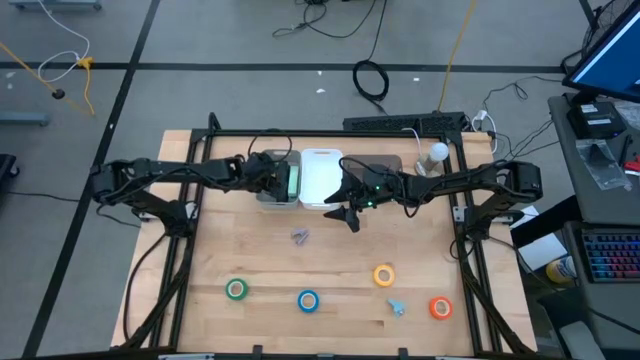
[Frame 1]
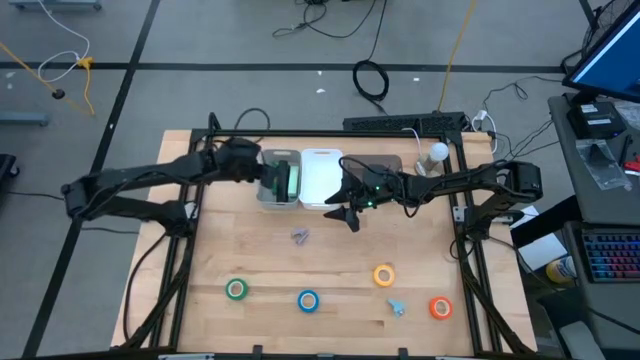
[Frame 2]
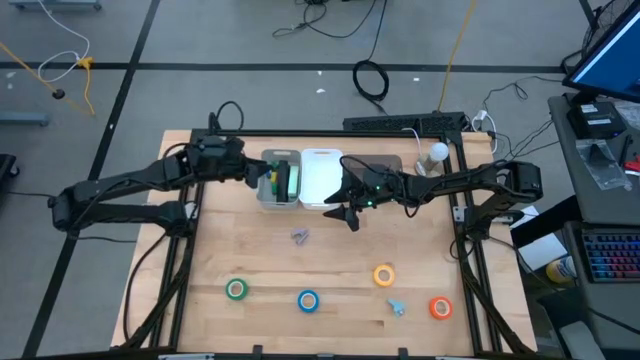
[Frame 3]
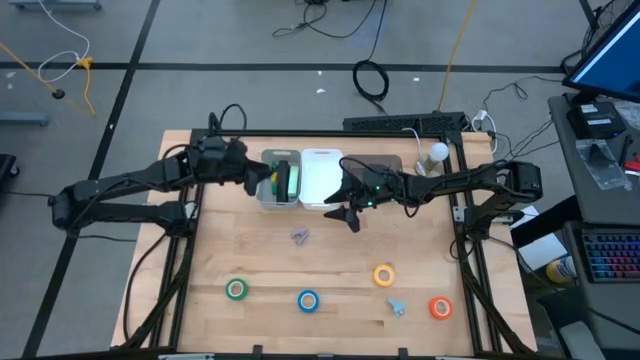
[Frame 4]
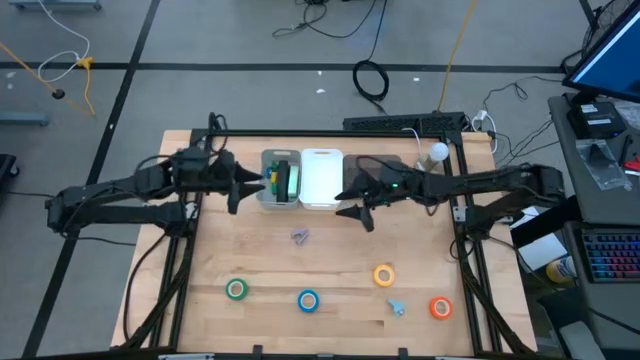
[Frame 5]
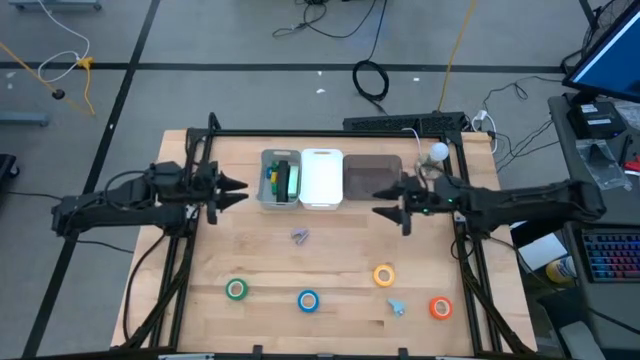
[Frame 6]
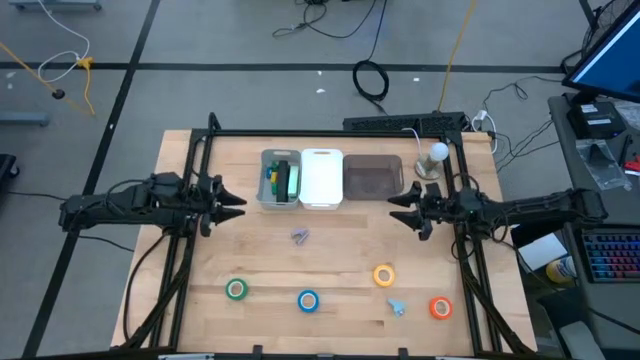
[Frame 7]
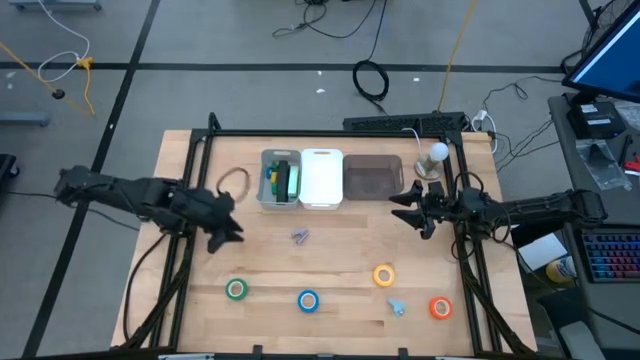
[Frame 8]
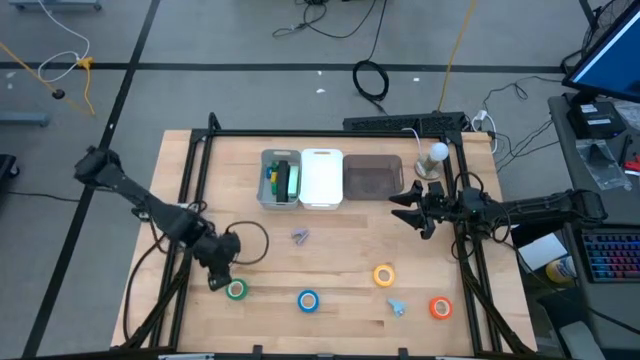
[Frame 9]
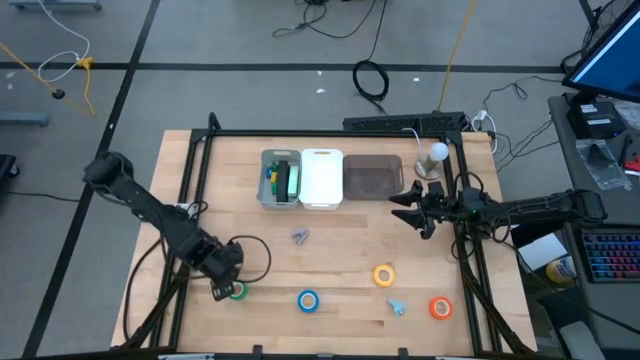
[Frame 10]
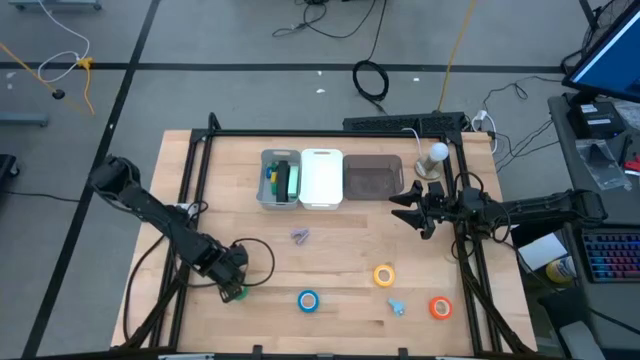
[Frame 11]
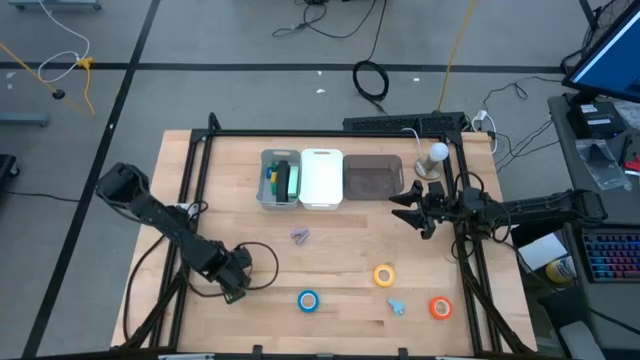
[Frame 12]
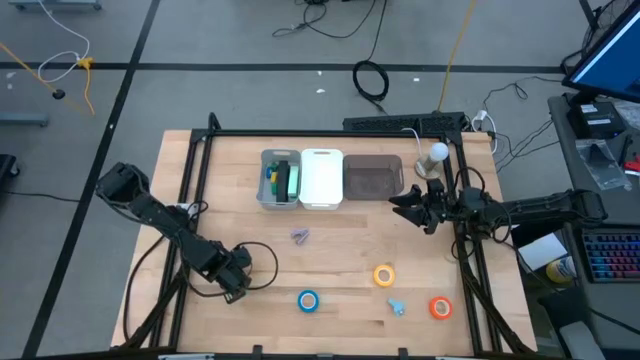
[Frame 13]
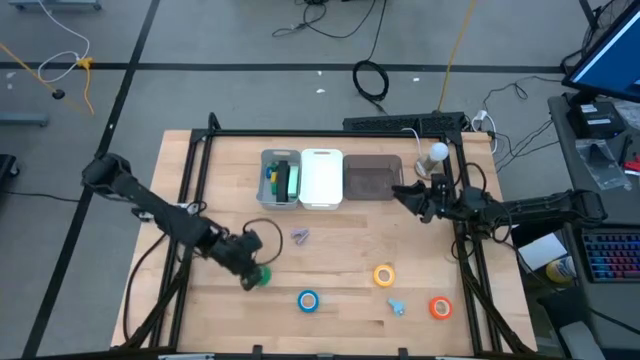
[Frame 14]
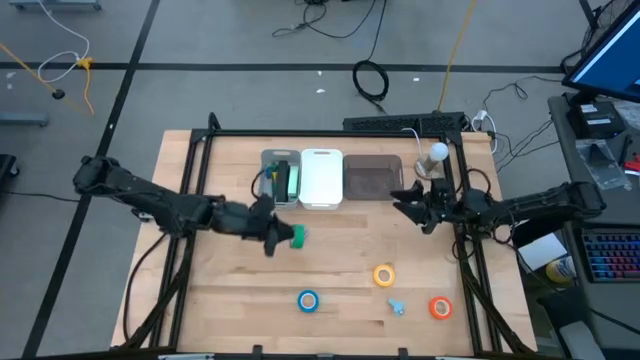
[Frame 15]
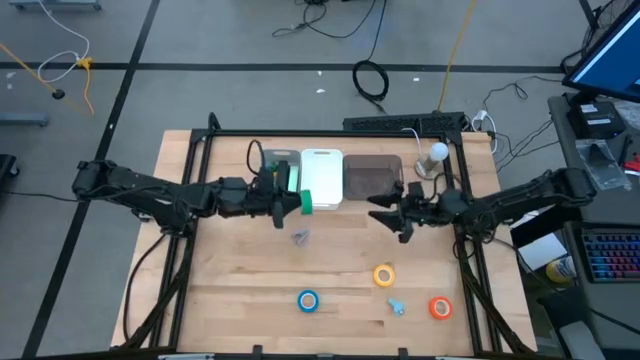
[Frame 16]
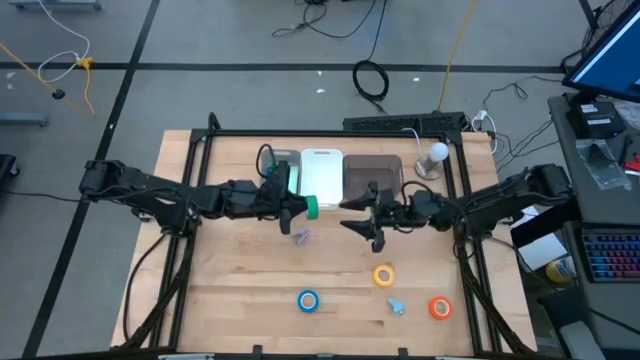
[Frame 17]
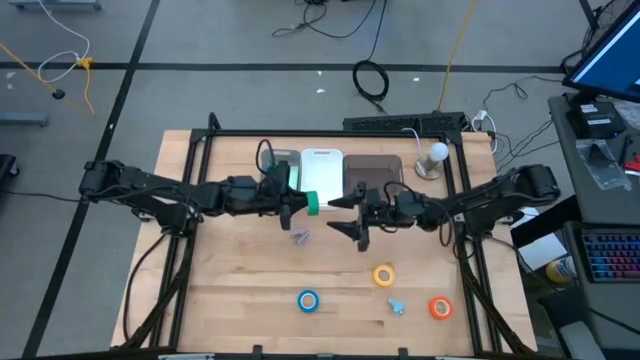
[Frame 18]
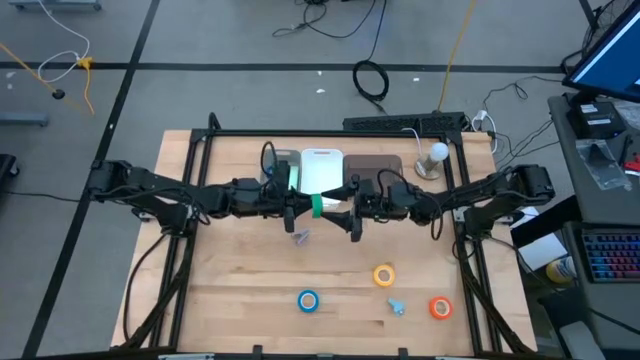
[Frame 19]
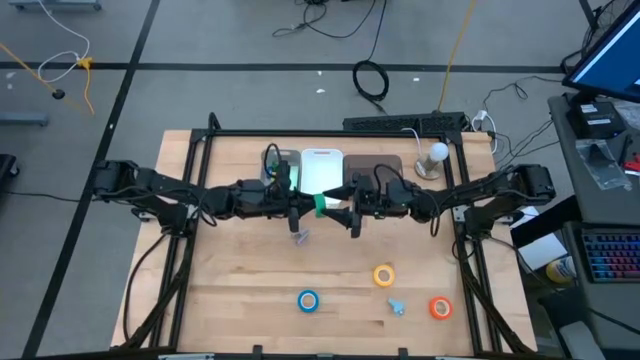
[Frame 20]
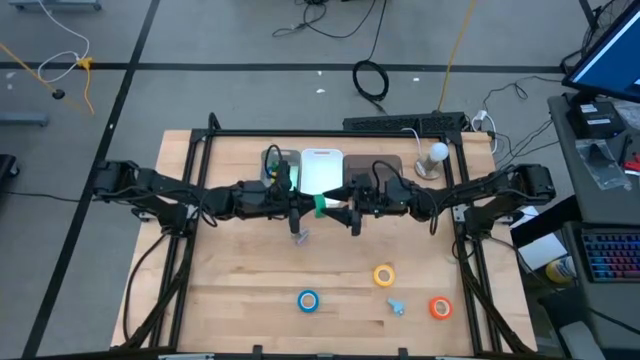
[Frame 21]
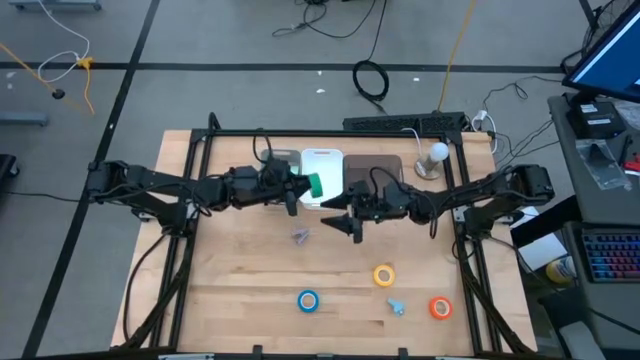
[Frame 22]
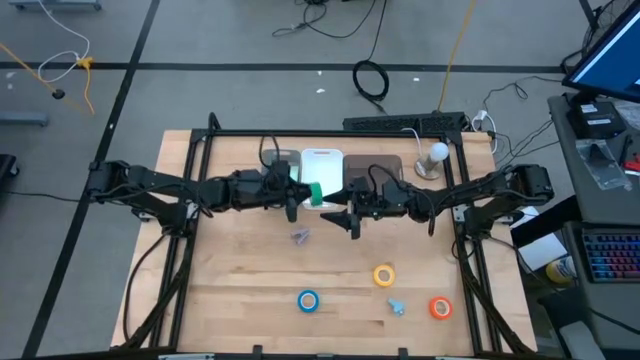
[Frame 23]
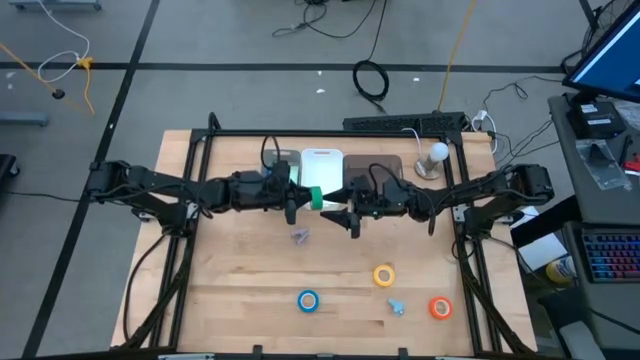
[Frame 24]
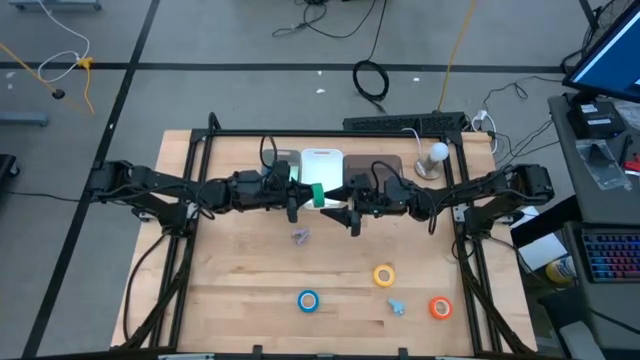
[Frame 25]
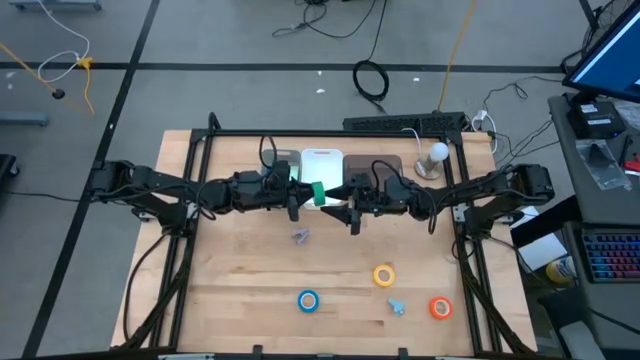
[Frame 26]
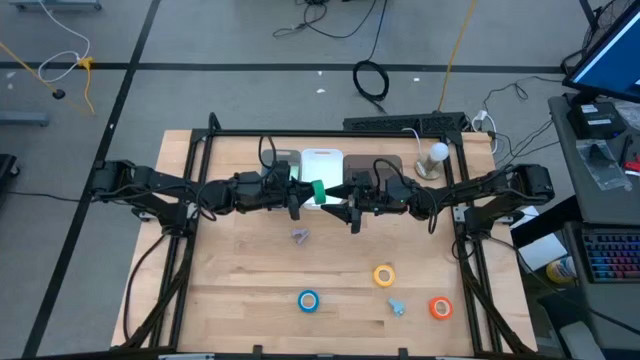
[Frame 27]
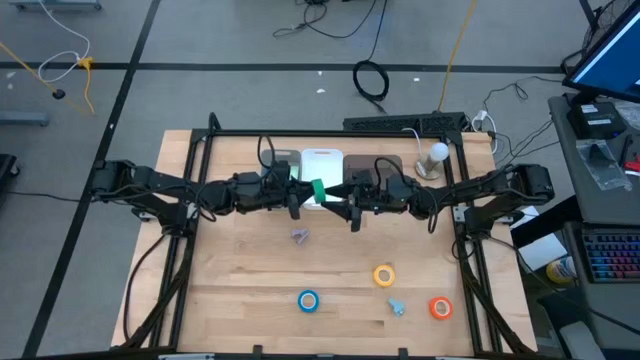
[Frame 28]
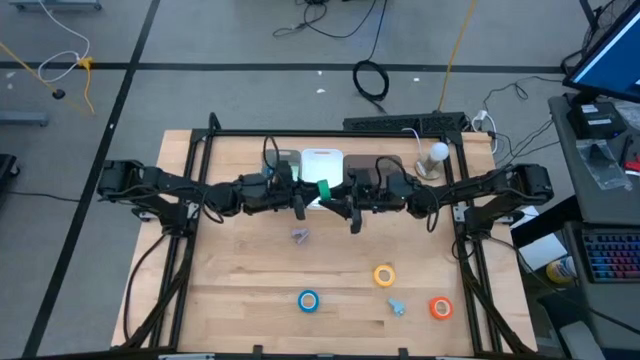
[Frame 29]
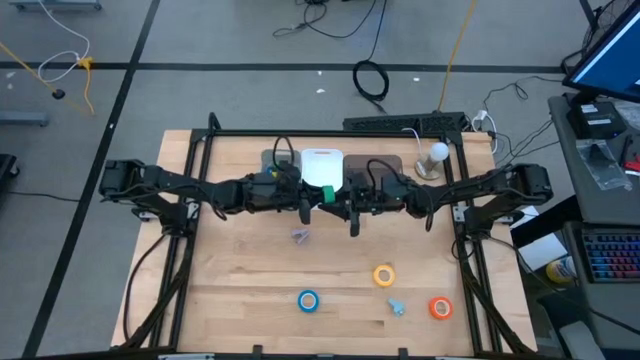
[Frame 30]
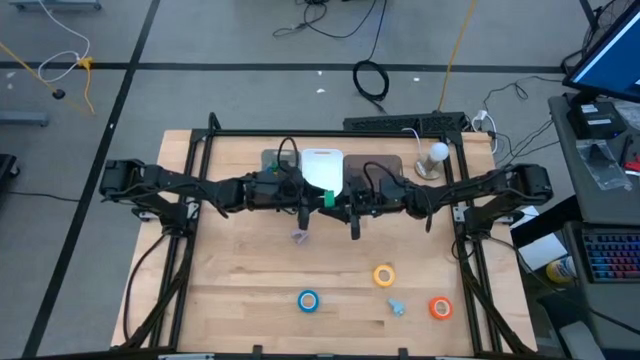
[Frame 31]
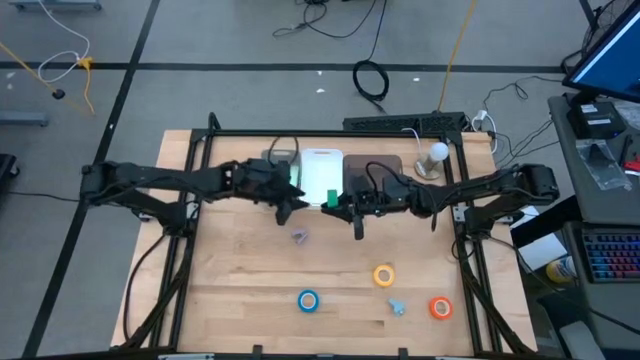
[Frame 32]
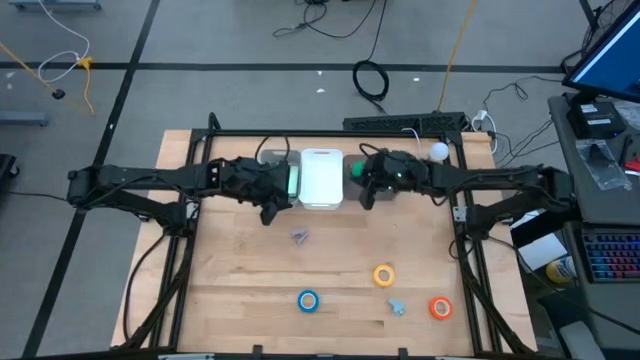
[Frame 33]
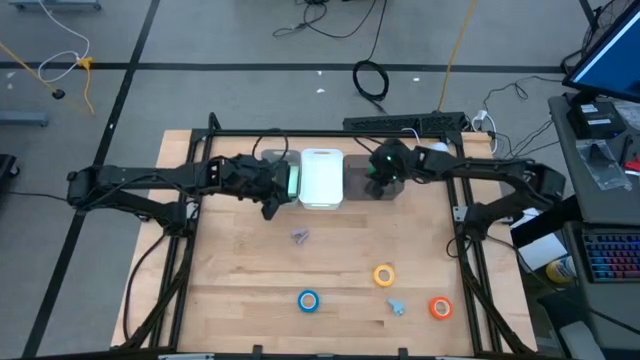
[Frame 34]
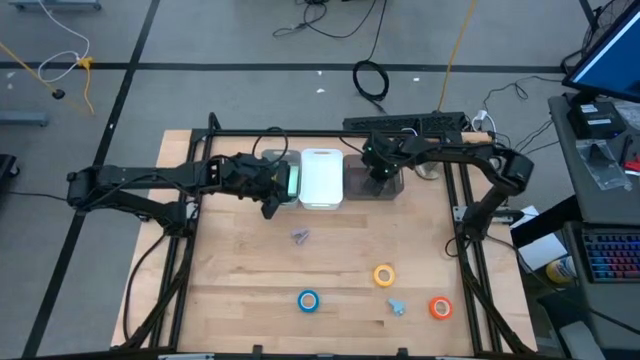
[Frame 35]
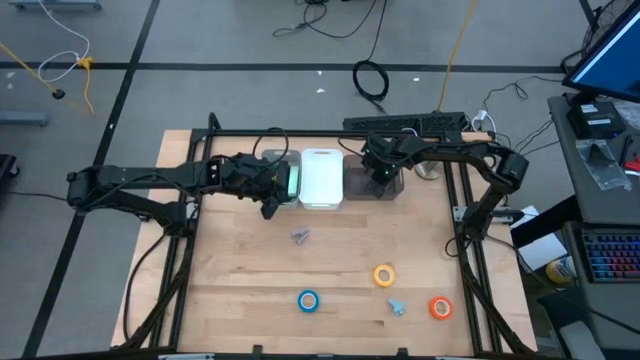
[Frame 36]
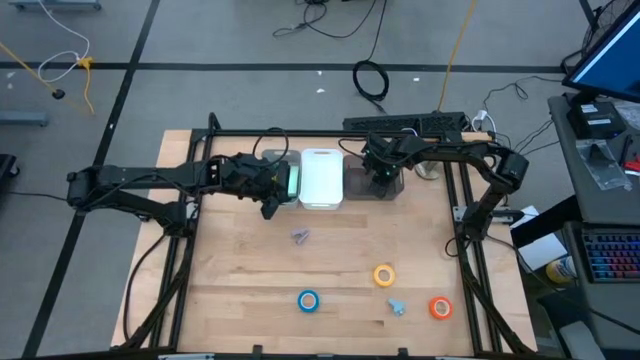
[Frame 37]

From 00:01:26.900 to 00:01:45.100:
Task: Pick and place Stapler, Stapler remover, tape
Put the green tape into the black bin

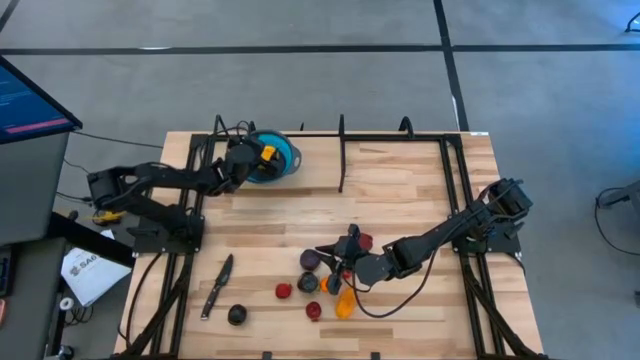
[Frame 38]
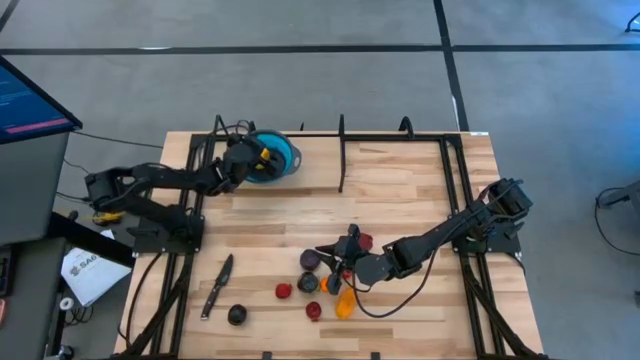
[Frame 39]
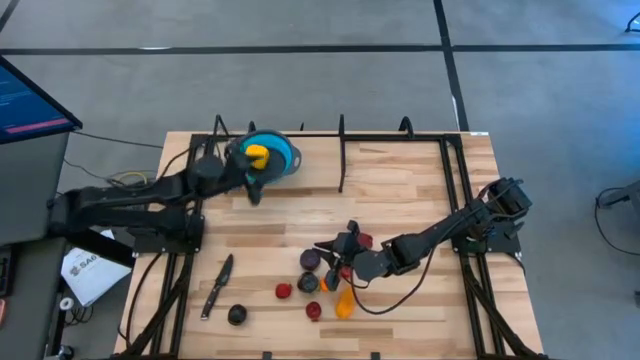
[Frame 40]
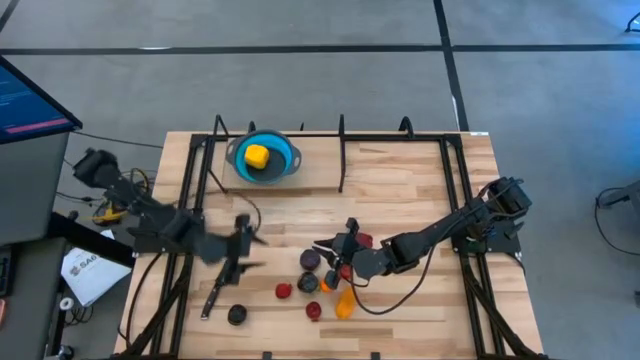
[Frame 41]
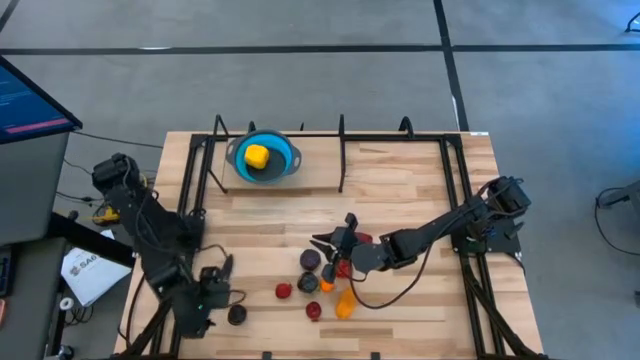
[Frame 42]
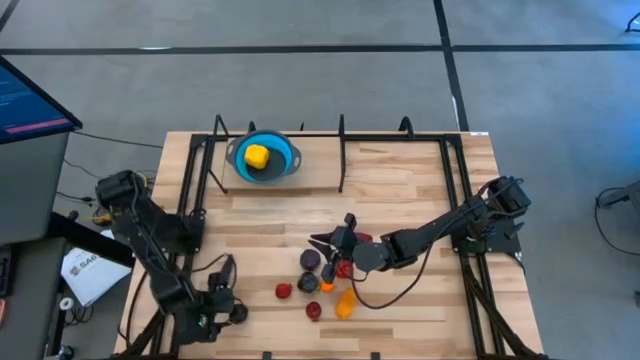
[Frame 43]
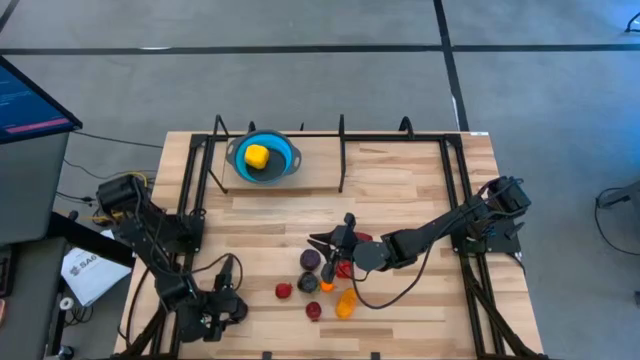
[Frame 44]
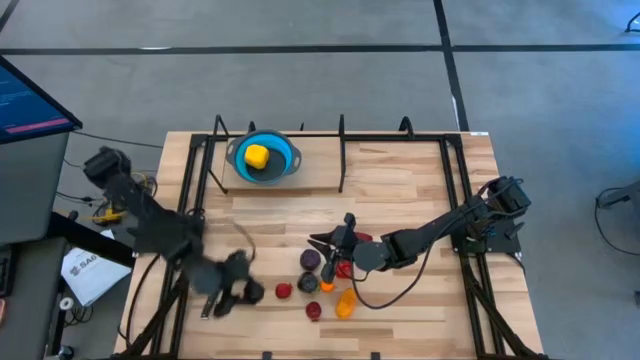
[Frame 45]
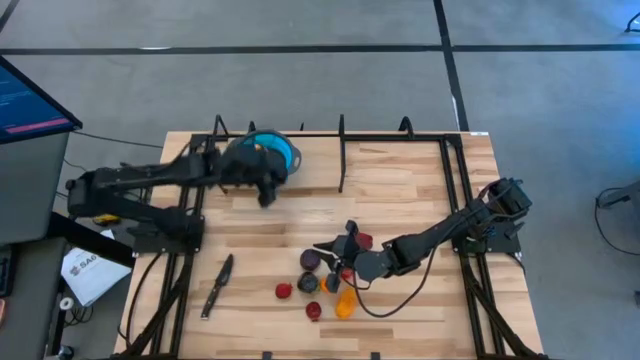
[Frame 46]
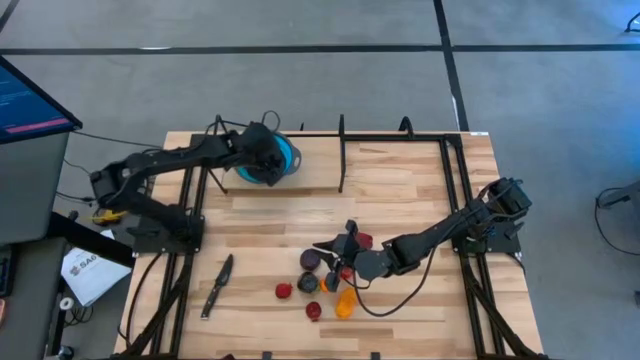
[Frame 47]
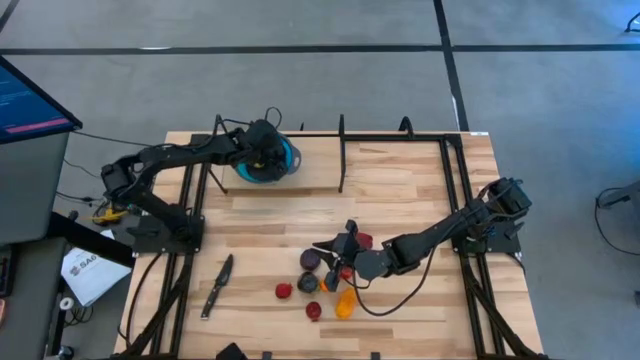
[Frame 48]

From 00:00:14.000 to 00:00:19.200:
Task: Pick & Place Fruit
Put the bottom left plum in the blue strainer bowl on the shelf
